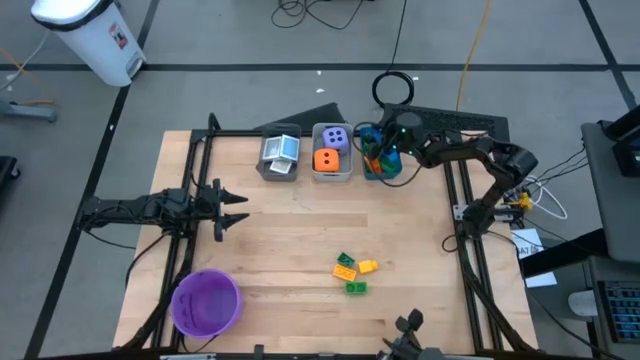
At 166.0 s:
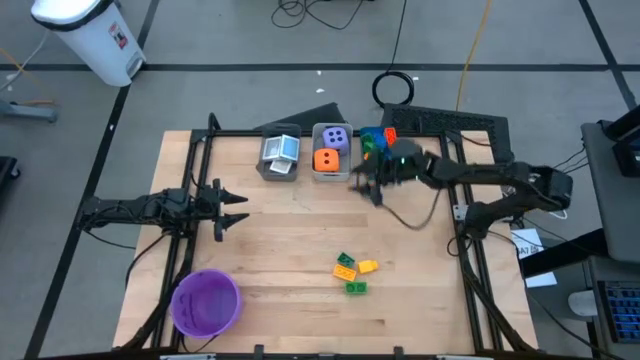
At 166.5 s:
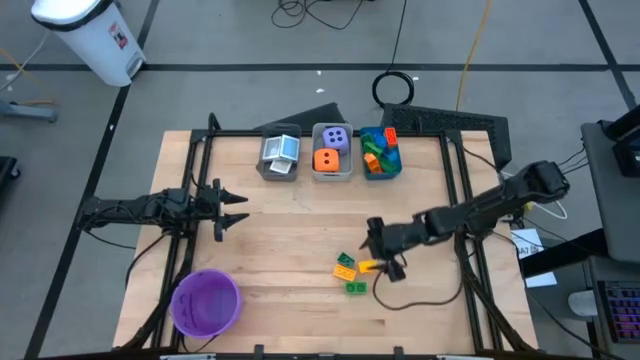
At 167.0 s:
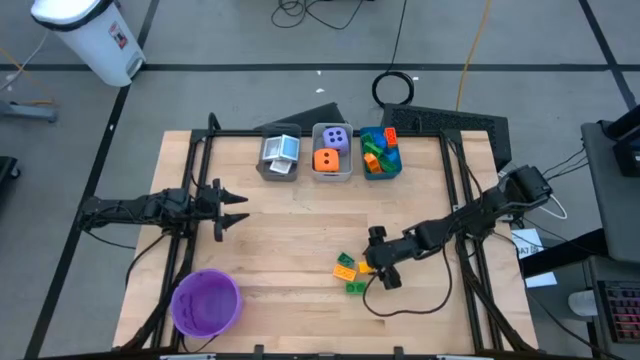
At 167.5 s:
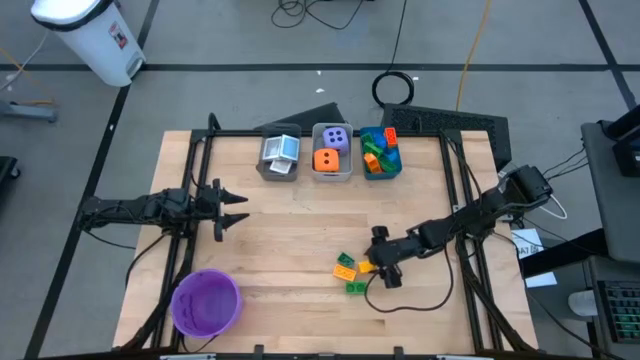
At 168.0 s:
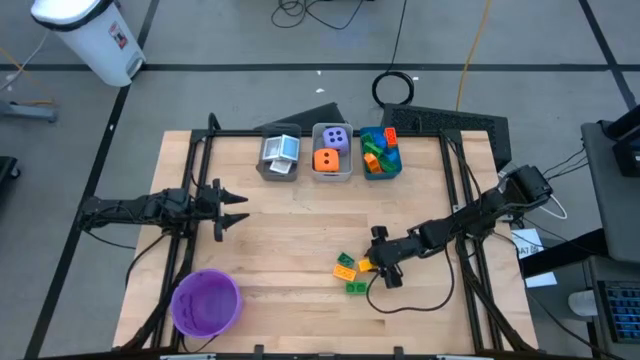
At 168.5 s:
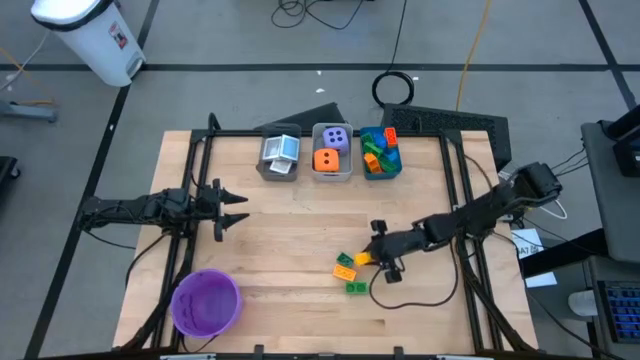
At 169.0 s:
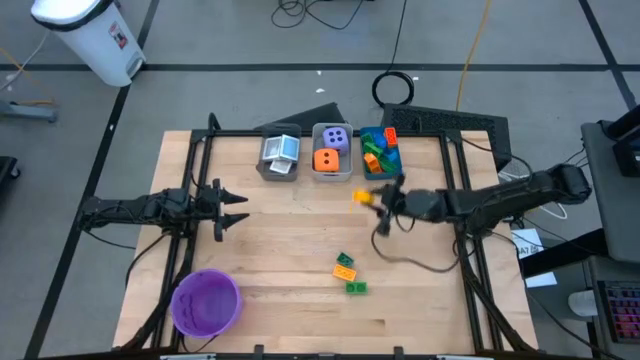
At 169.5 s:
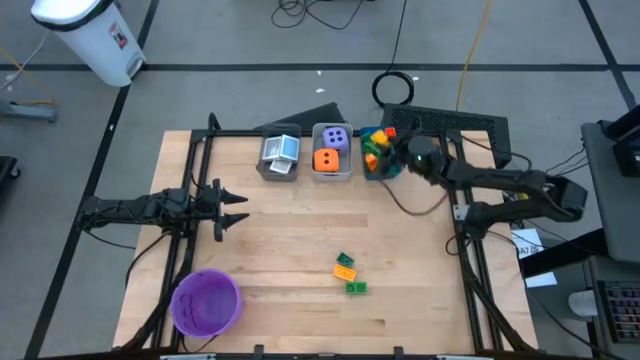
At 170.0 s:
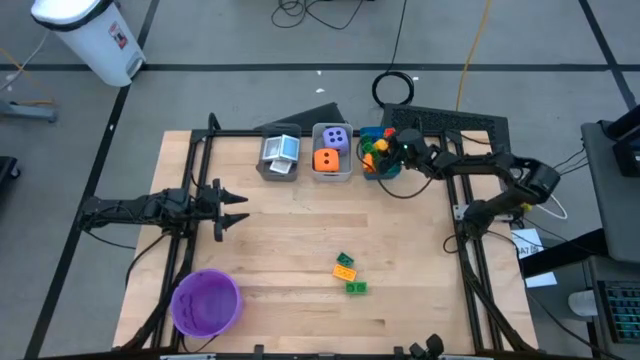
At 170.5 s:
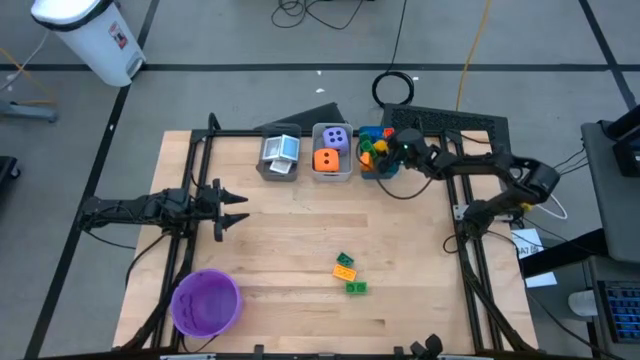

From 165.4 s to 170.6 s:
Task: Pick & Place Toys
Put the yellow game piece into the blue bin

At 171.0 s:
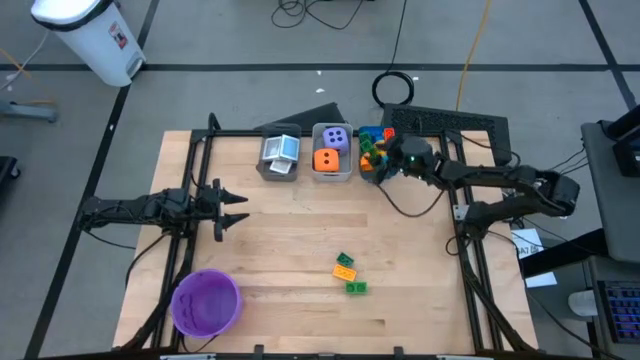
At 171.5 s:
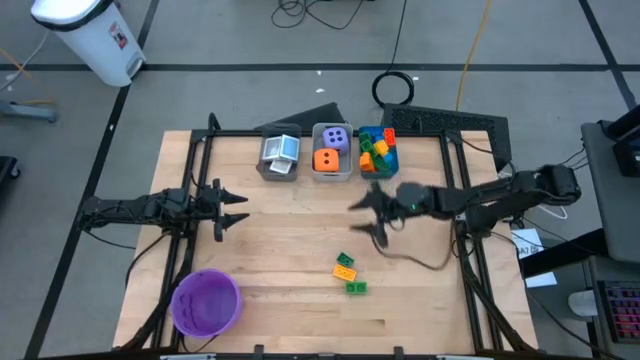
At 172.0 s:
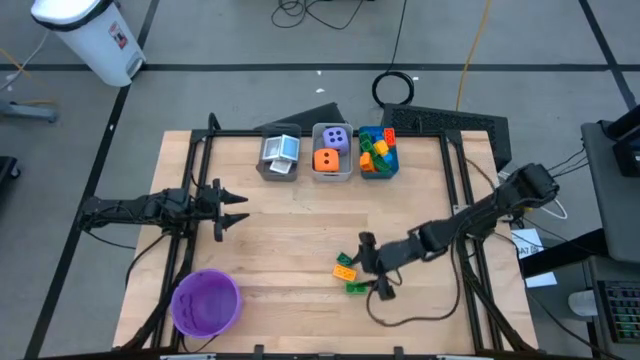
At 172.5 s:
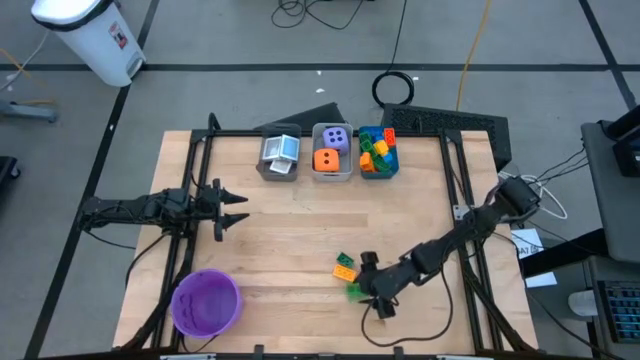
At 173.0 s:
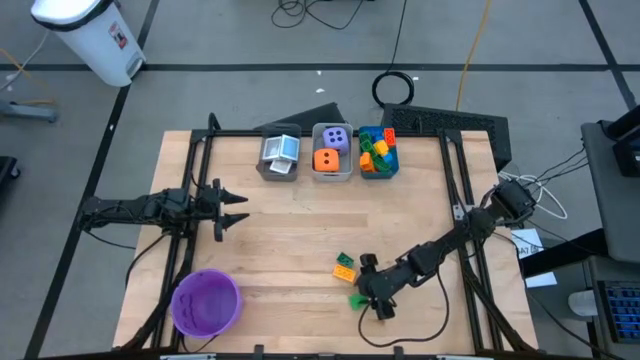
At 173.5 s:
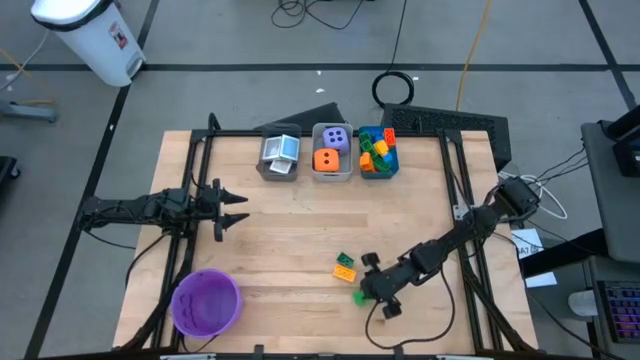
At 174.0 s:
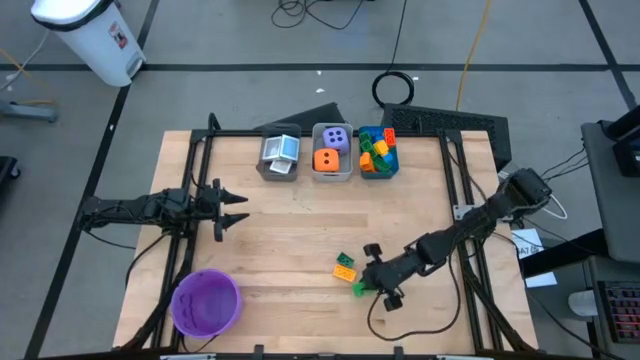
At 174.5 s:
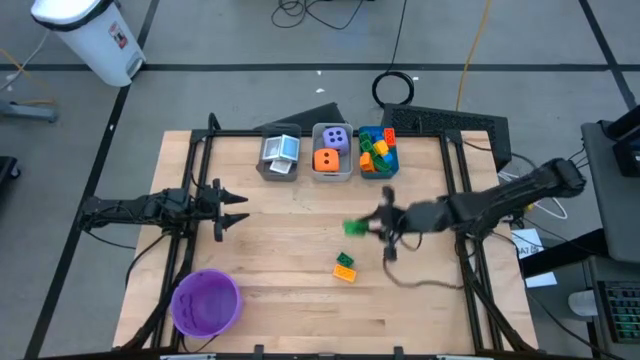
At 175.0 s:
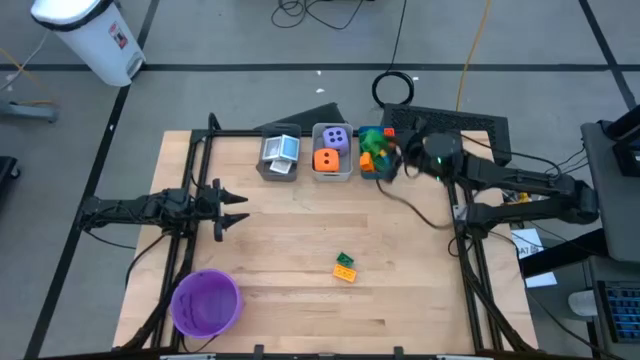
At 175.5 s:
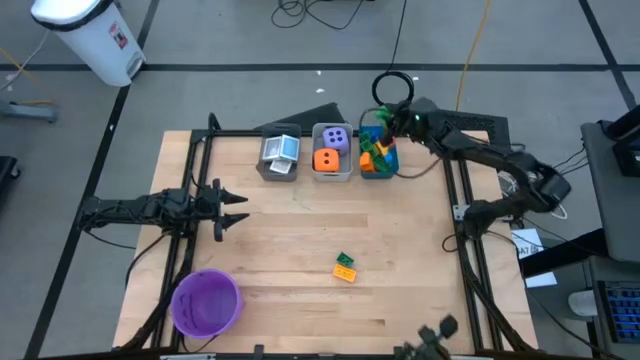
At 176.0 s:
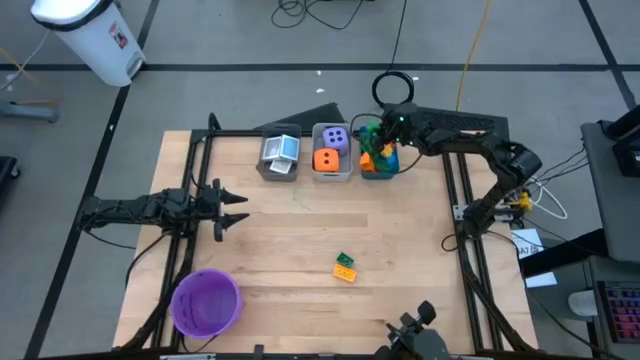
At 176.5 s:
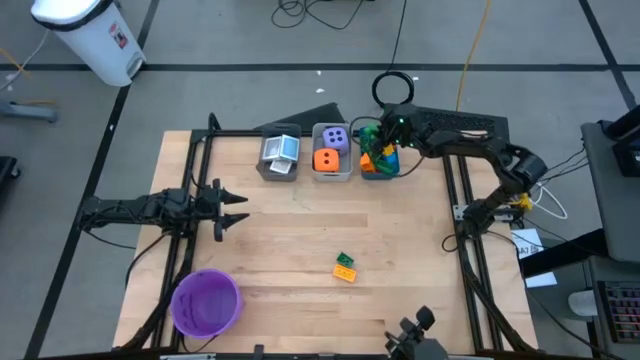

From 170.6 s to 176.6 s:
Put the green game piece into the blue bin

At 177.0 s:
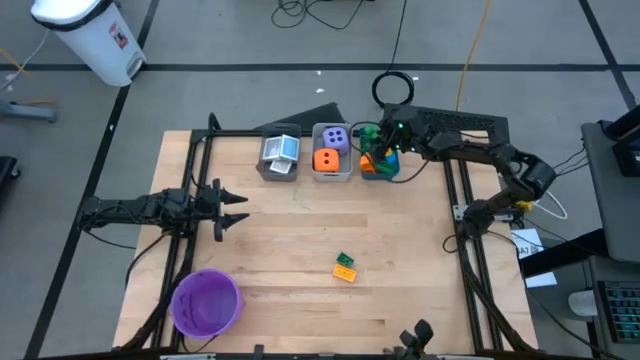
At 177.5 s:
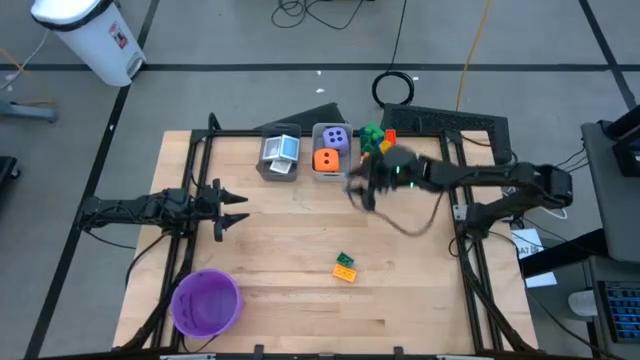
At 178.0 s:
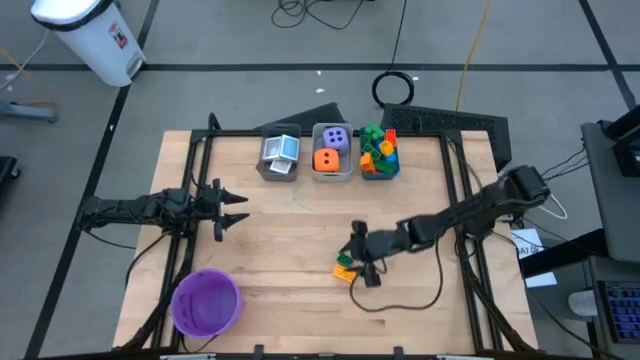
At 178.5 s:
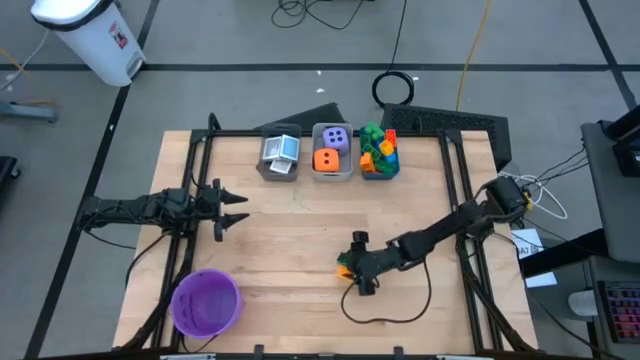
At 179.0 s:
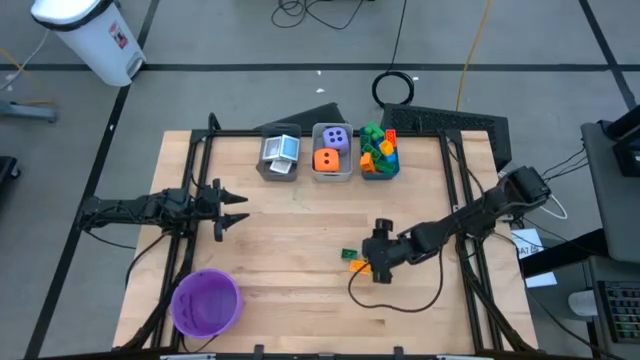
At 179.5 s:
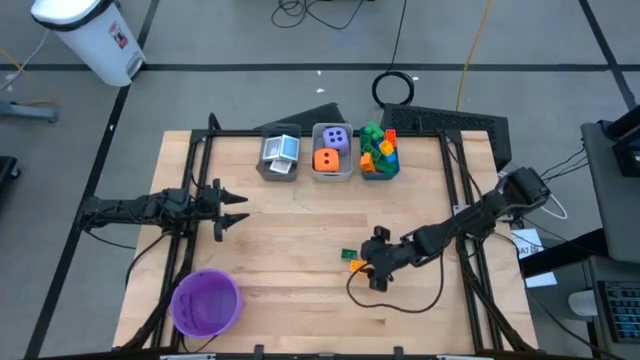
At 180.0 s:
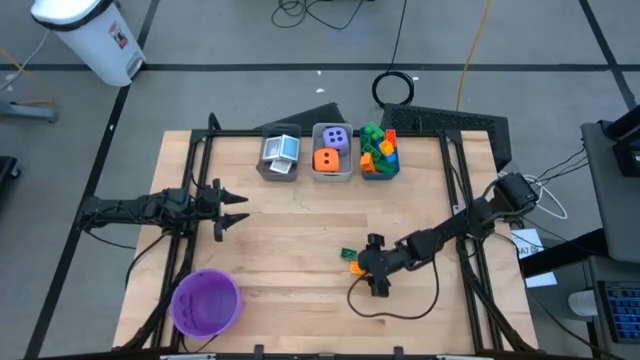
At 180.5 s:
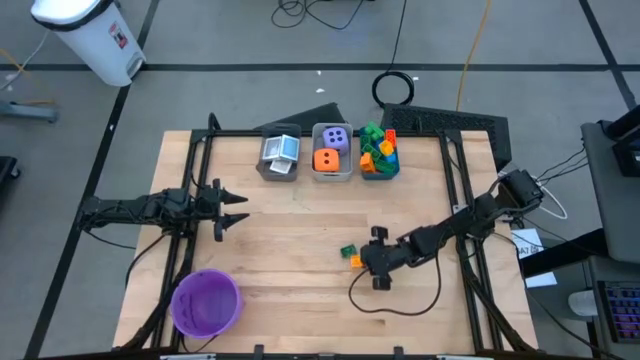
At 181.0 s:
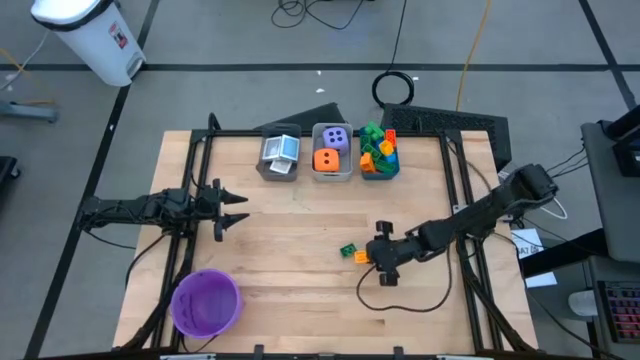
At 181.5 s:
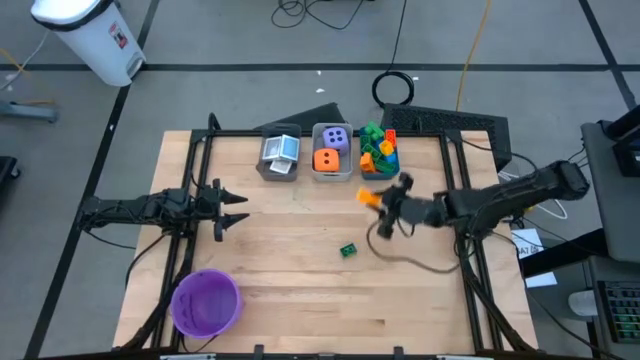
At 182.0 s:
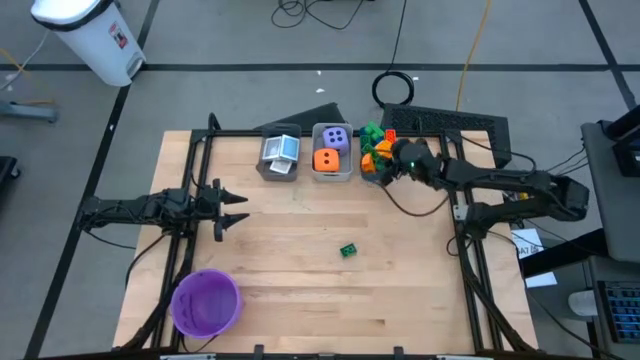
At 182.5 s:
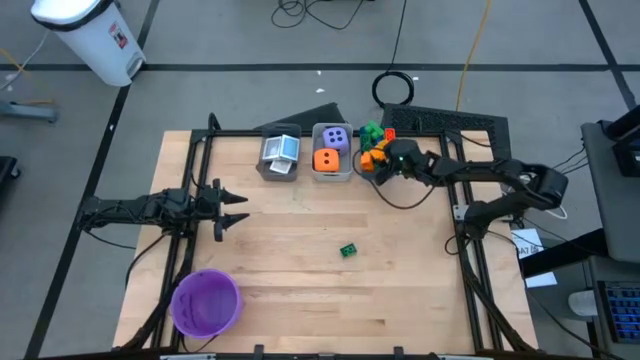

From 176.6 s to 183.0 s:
Put the yellow game piece into the blue bin

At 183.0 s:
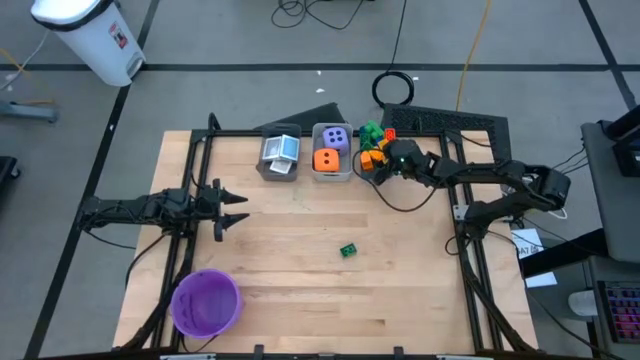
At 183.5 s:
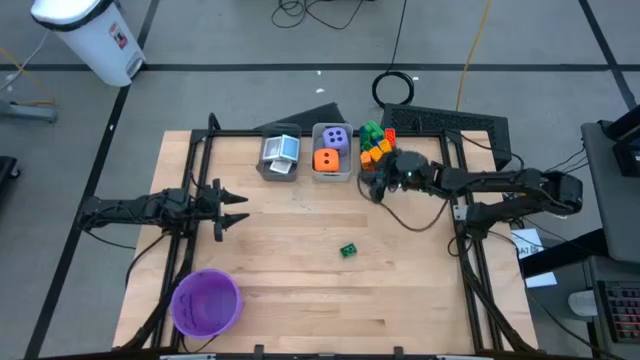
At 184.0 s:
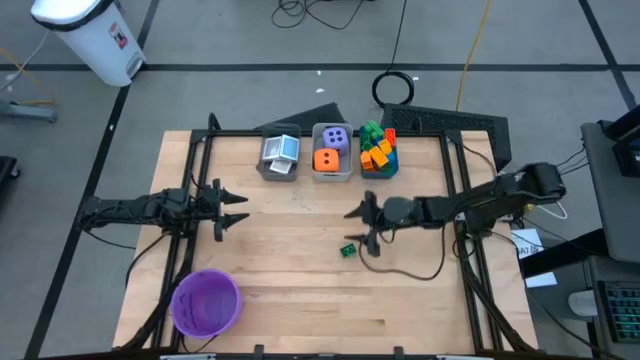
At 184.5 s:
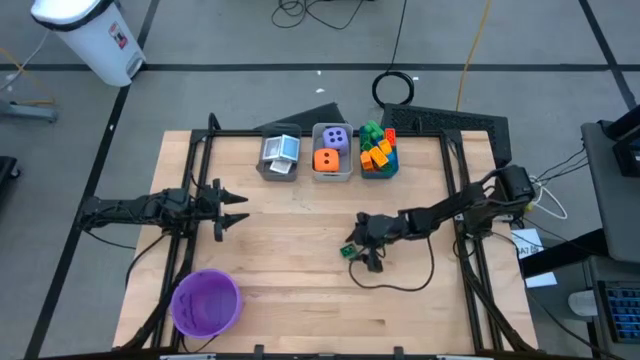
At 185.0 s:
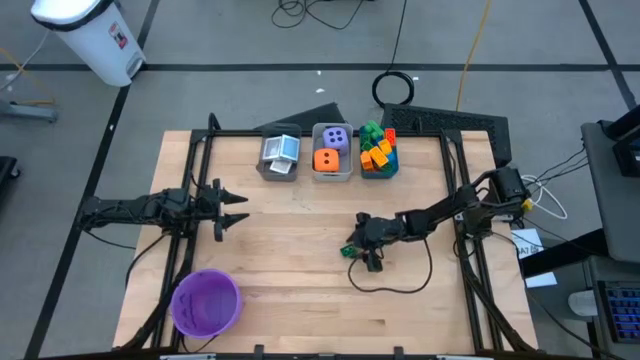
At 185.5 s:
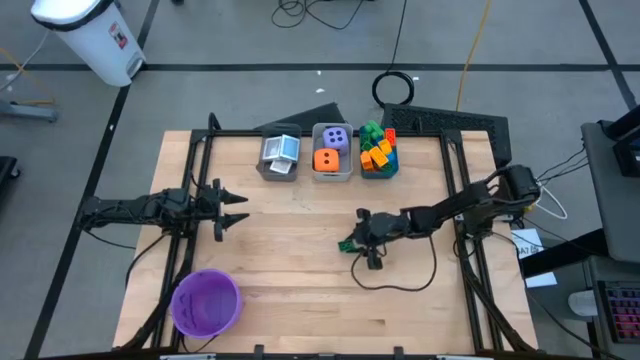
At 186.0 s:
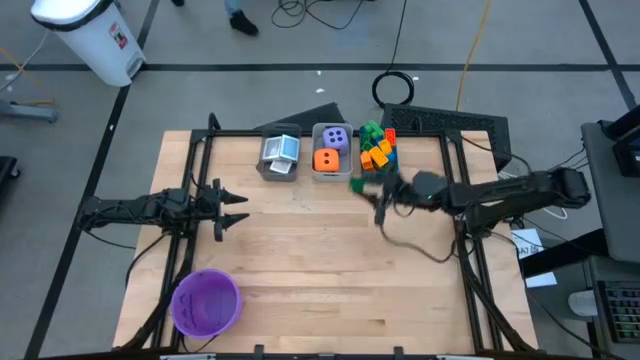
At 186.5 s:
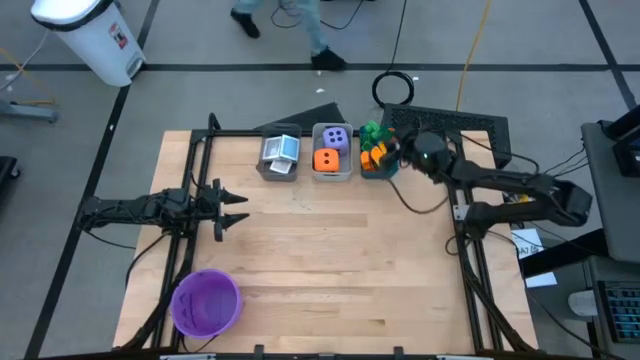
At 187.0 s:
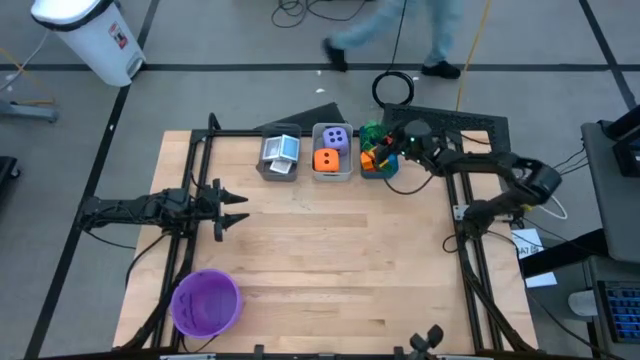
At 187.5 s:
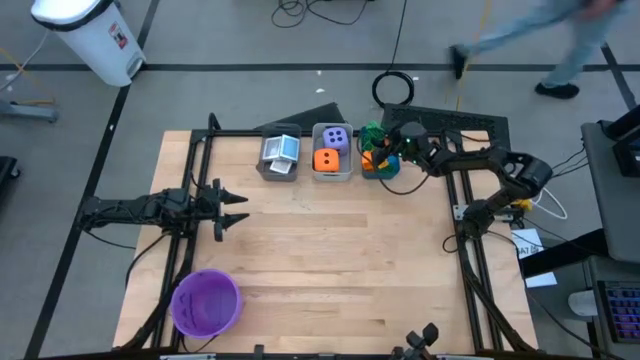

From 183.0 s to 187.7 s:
Put the green game piece into the blue bin
